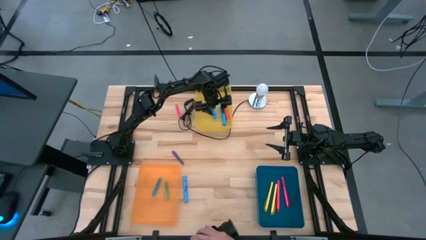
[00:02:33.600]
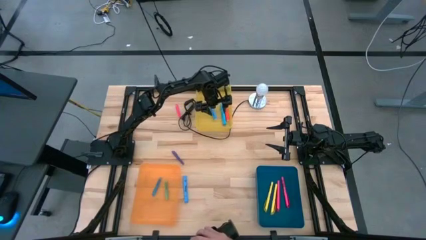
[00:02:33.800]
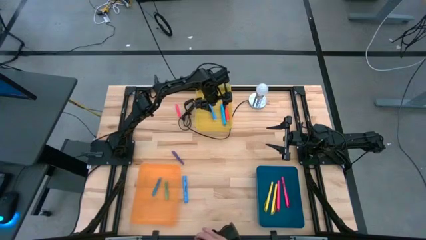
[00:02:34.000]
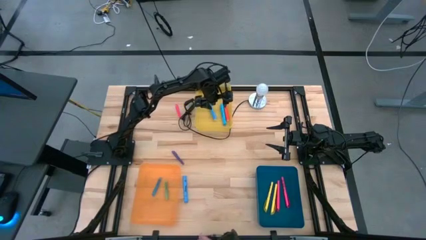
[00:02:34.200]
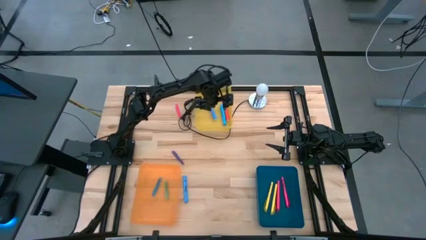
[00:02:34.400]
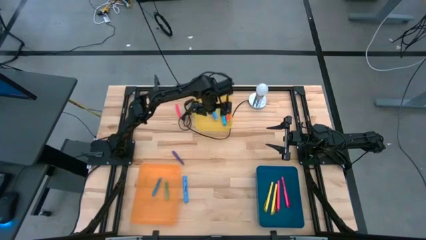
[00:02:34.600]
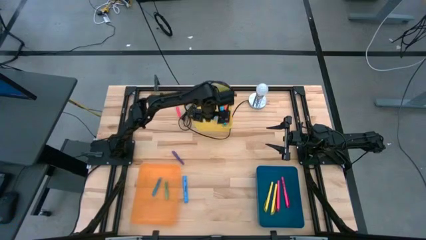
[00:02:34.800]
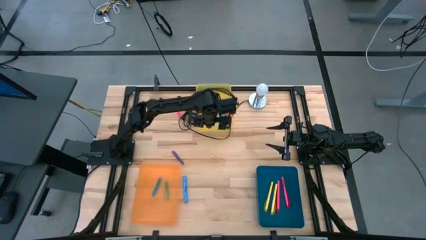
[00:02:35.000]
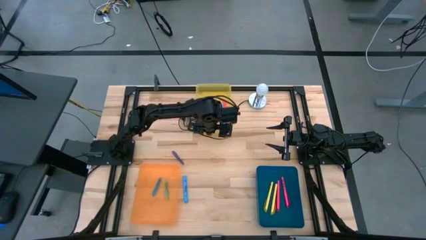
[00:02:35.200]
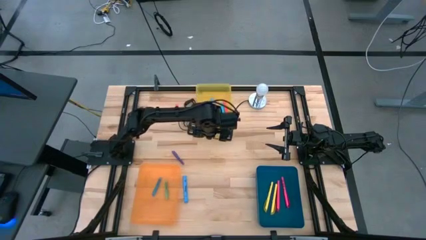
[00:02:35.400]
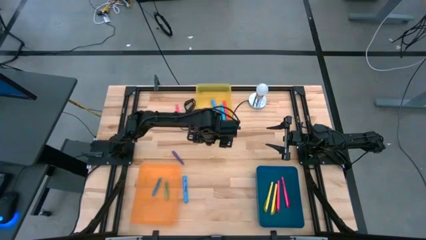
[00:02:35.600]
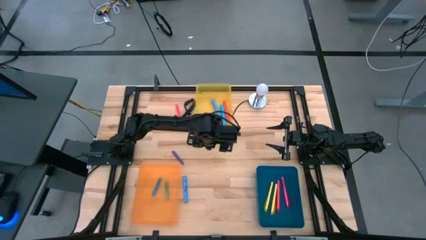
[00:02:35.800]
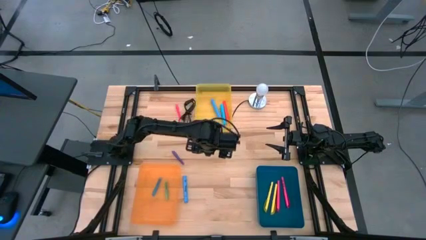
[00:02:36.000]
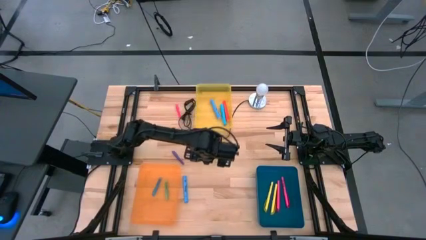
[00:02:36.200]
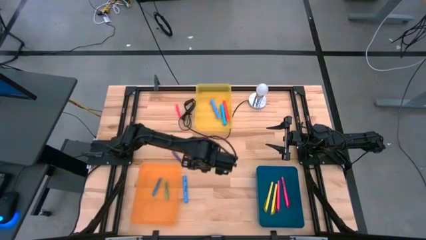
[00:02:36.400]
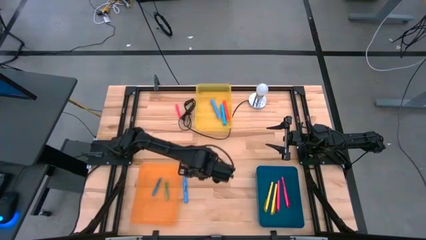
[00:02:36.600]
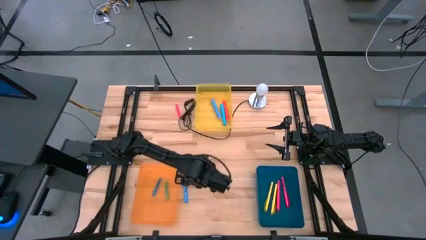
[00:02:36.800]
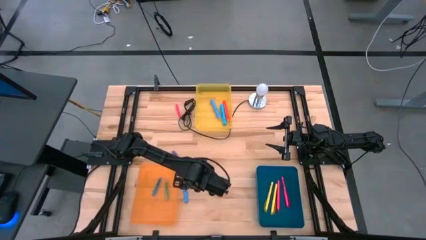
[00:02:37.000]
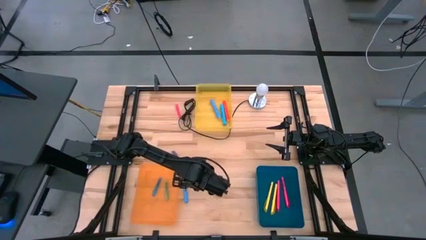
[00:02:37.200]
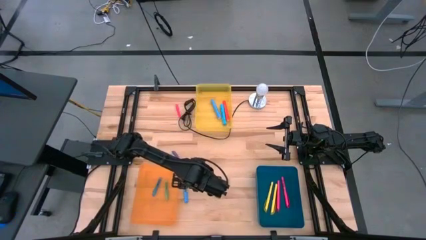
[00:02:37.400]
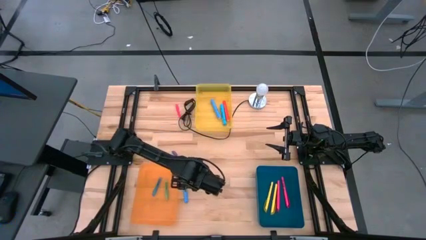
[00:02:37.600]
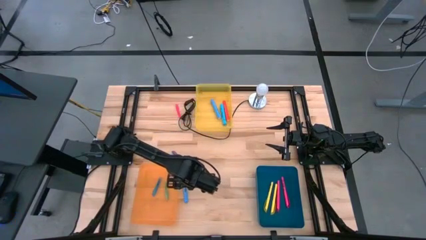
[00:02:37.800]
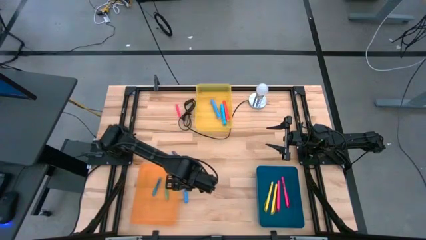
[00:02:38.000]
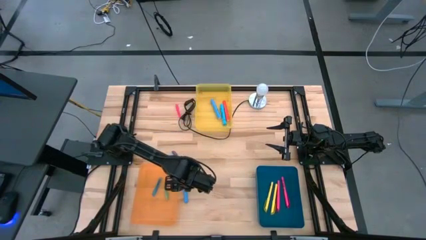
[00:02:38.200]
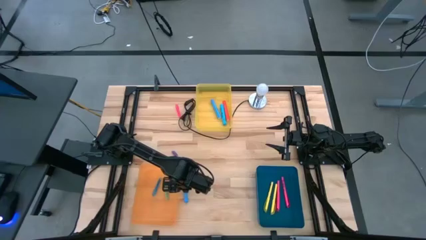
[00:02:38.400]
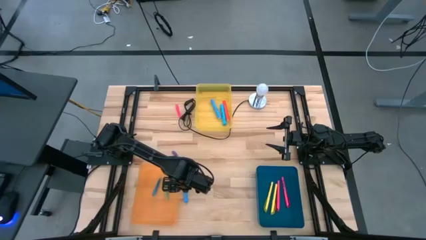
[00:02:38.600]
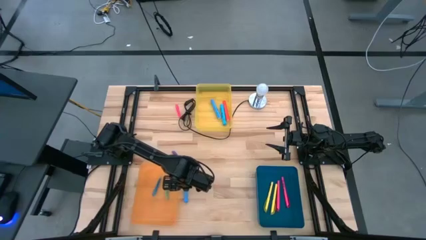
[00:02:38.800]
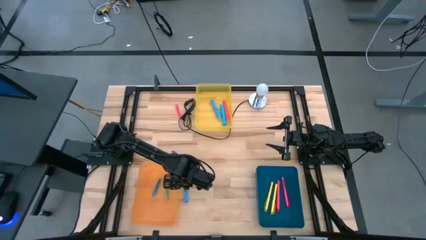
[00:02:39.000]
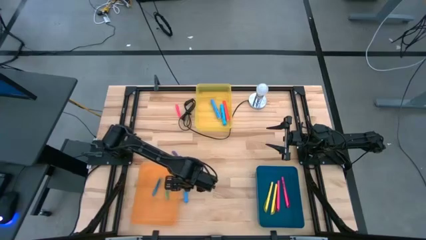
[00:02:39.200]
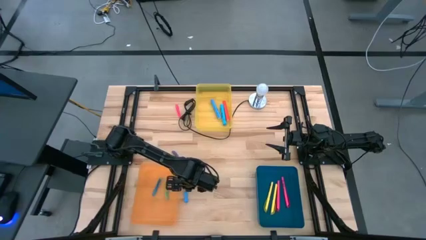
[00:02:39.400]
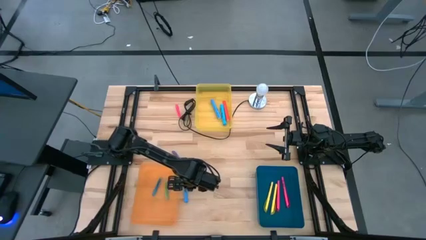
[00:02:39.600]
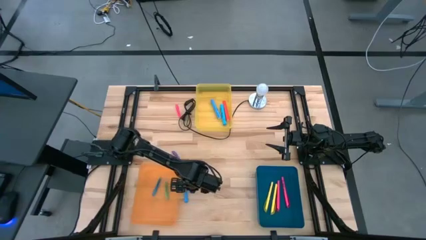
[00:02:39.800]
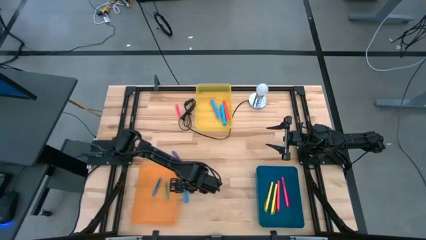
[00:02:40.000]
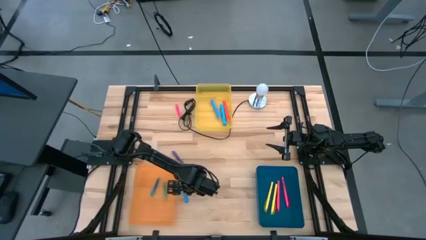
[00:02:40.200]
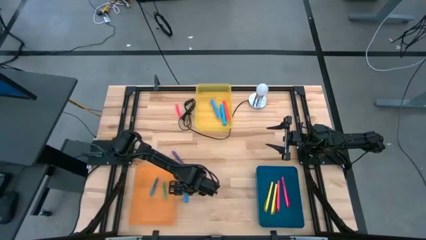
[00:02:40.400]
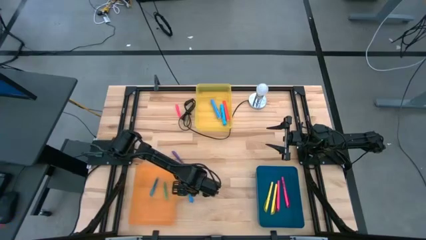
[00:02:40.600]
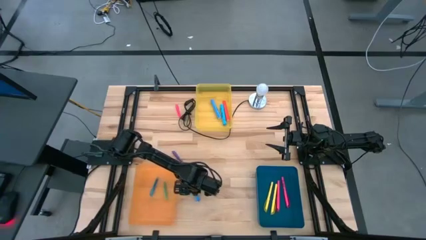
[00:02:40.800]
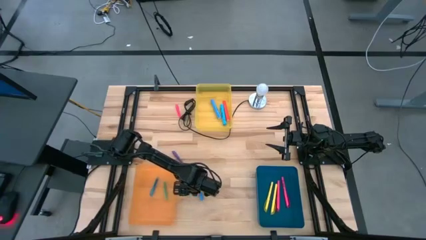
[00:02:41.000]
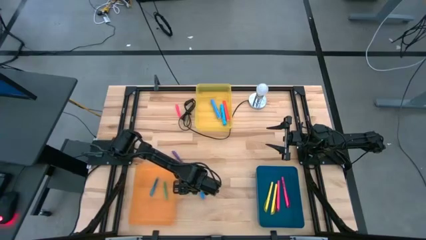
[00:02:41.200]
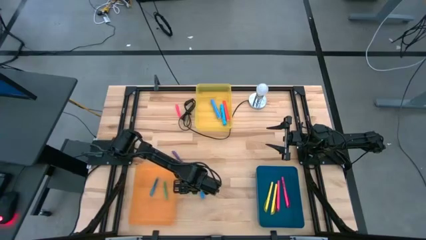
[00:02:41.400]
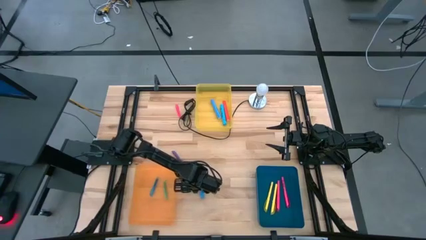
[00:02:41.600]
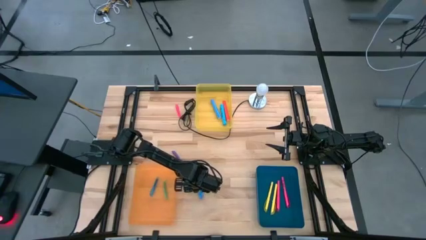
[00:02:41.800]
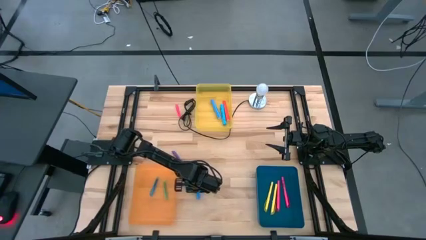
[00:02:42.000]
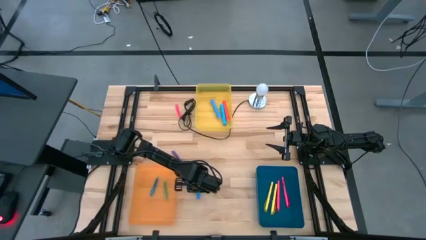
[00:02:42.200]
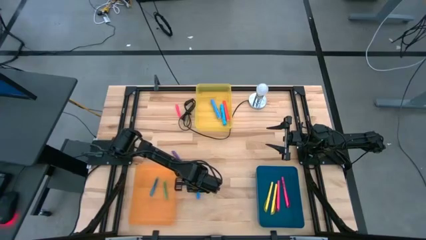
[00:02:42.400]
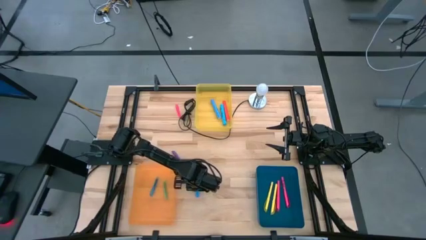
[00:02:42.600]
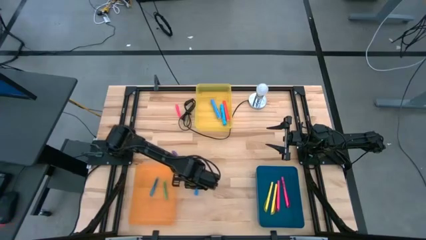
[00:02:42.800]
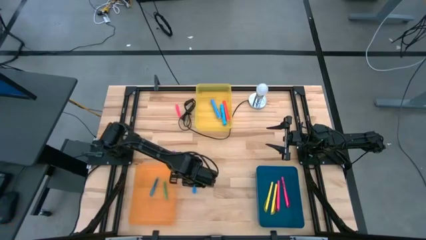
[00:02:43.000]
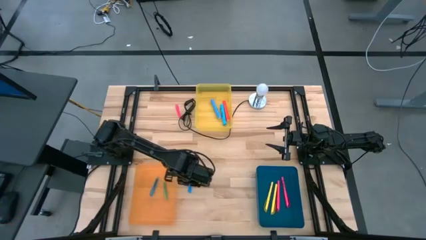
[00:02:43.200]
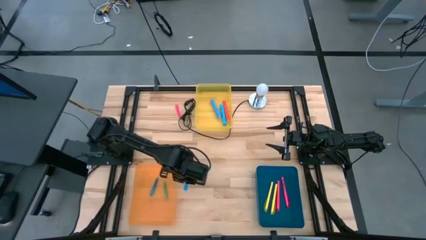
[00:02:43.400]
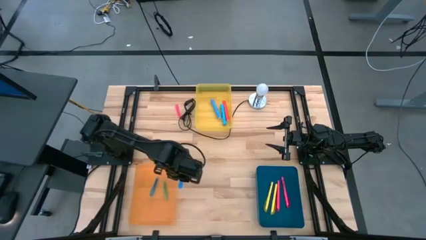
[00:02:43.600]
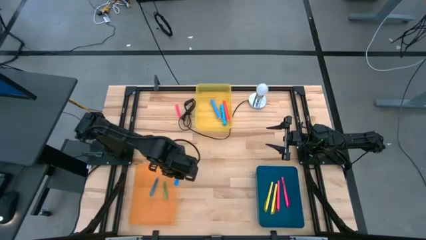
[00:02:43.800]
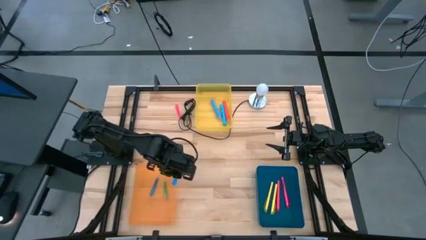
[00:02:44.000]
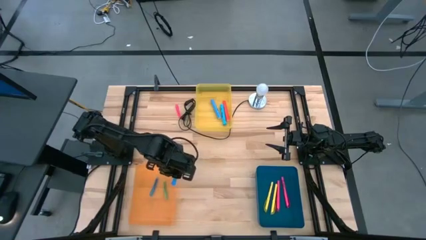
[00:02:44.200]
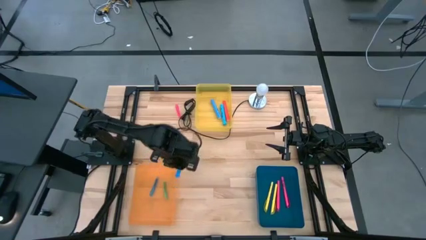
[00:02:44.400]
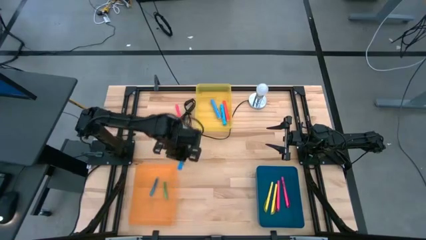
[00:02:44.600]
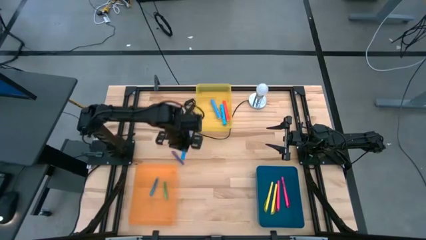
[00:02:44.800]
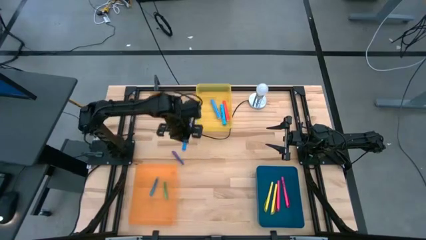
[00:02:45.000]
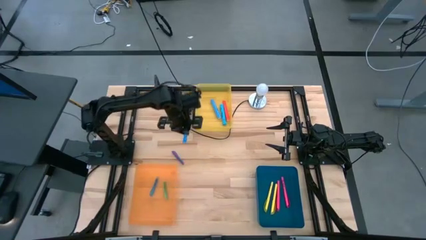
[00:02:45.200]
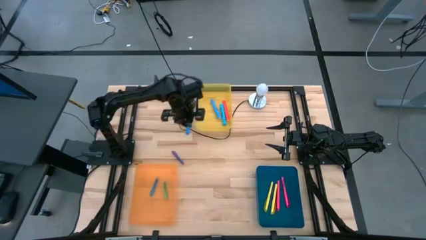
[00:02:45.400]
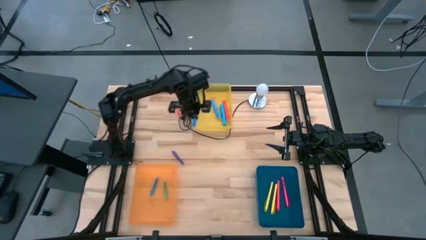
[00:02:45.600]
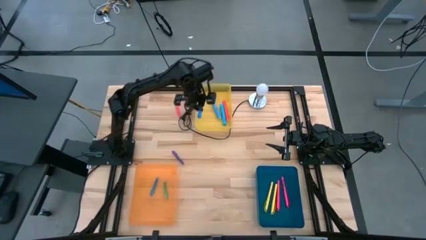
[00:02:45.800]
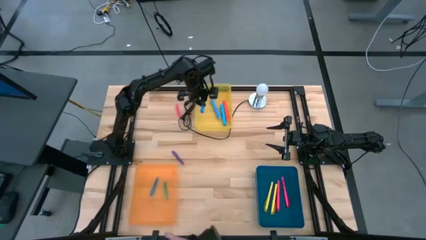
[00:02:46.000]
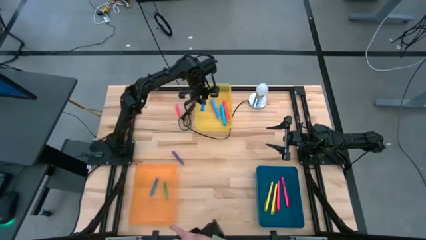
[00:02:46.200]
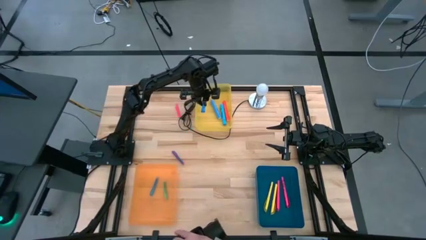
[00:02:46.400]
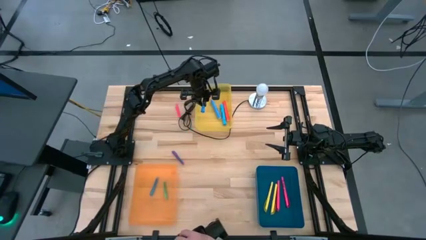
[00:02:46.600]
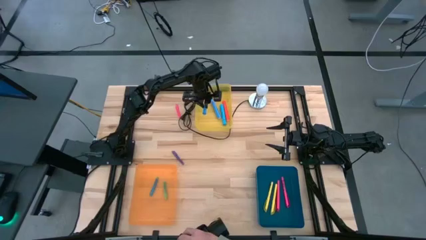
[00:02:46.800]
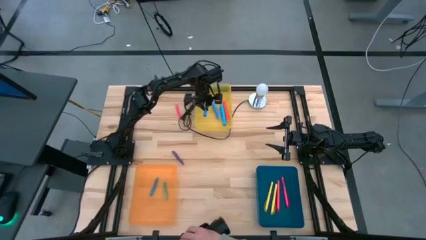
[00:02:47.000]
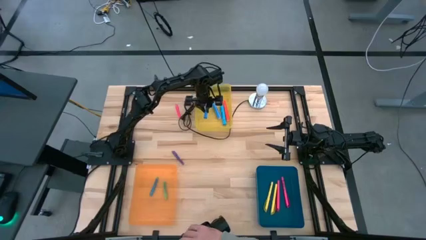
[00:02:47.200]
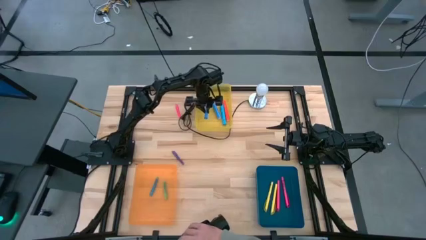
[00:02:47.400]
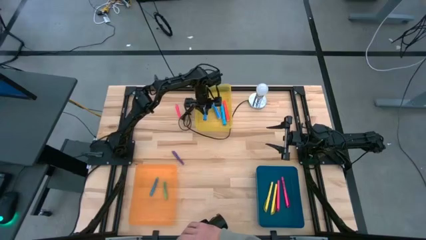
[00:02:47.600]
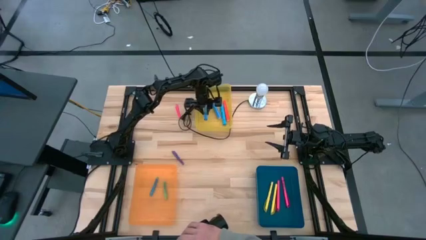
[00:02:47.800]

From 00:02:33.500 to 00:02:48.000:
Task: Pick & Place Markers
Put the blue highlighter into the yellow bin

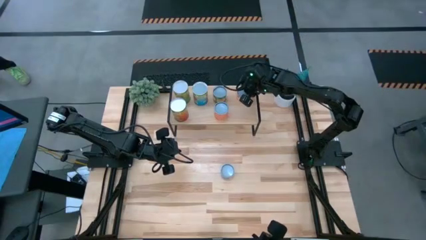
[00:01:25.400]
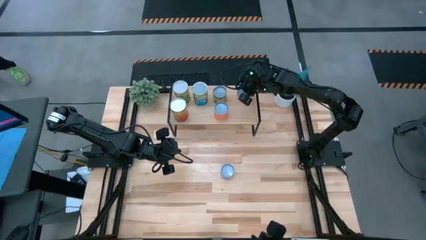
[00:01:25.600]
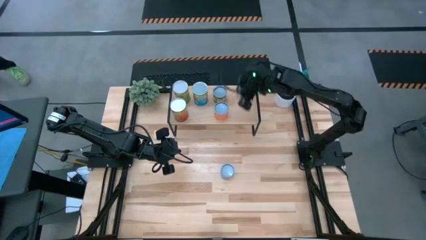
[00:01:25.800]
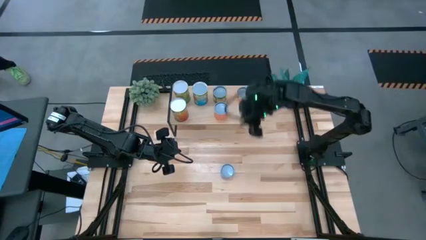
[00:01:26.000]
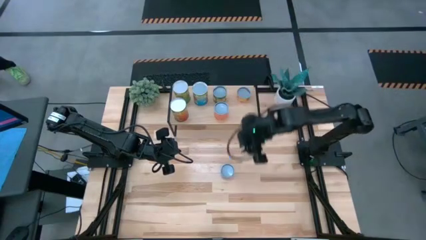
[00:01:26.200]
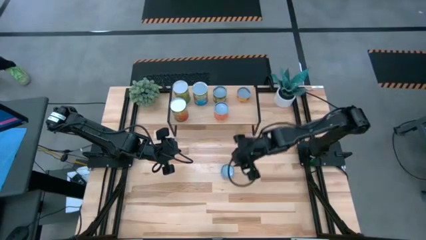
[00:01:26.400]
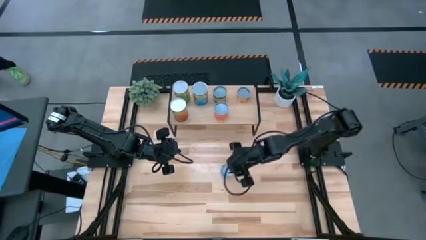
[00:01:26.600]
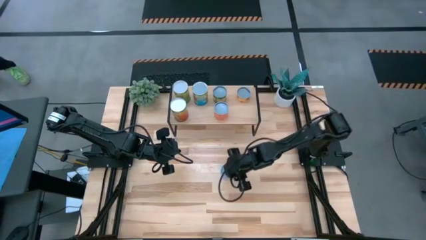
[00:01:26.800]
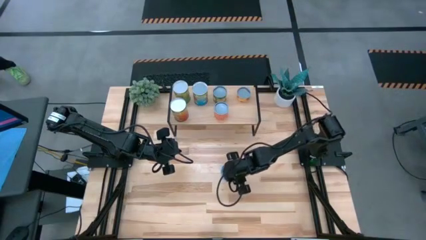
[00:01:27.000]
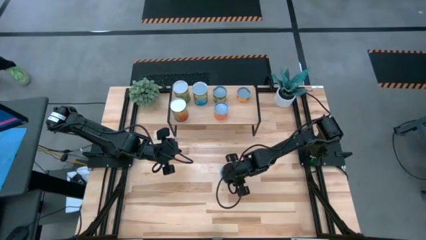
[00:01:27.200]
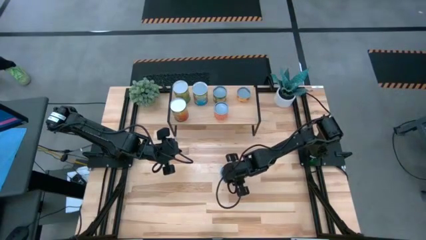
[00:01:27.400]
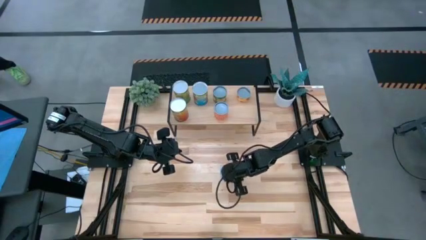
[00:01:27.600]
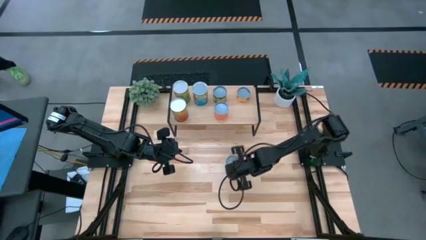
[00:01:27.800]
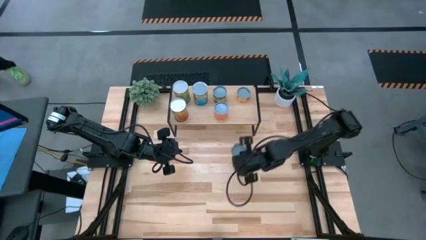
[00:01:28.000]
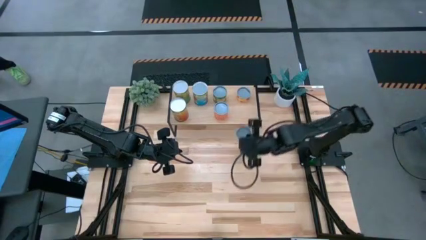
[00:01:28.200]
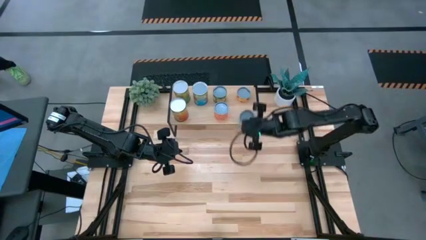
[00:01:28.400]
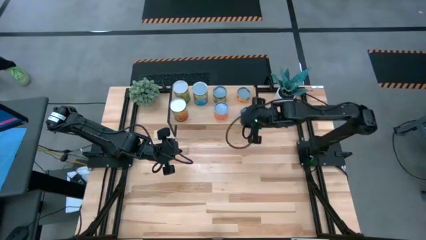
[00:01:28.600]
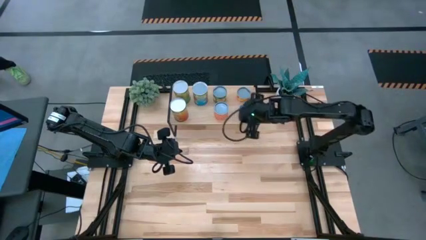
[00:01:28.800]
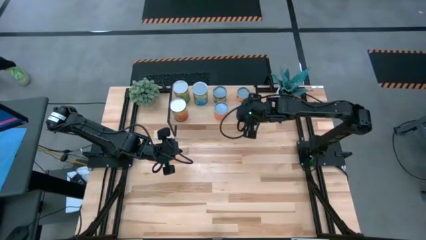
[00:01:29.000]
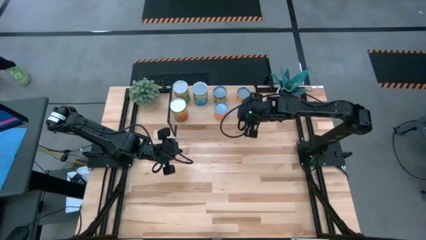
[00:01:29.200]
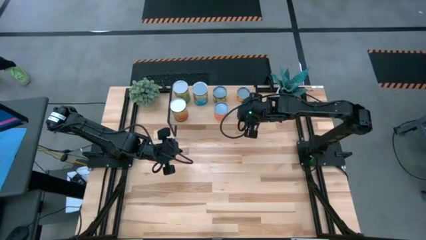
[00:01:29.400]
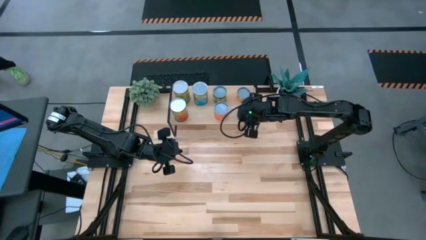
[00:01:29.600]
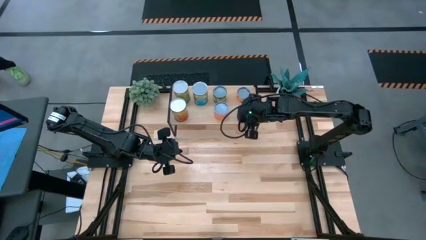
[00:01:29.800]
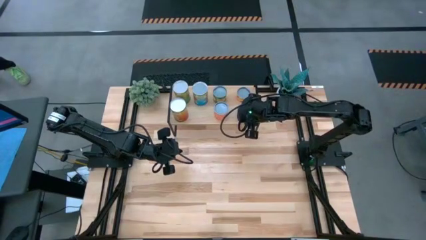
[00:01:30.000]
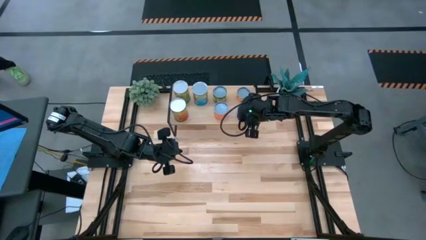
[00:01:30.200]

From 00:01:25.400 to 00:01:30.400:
Task: Pick and place cans onto a shelf
Put the salmon can on the shelf
